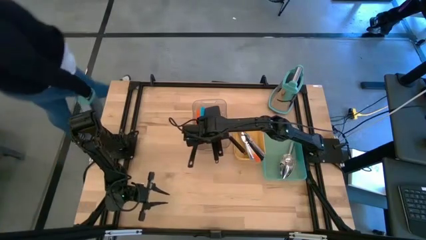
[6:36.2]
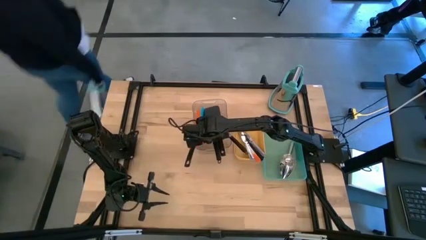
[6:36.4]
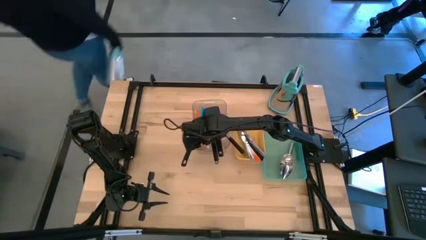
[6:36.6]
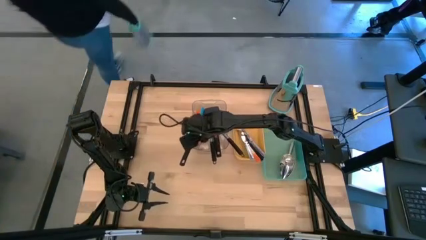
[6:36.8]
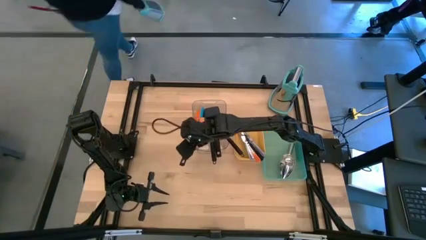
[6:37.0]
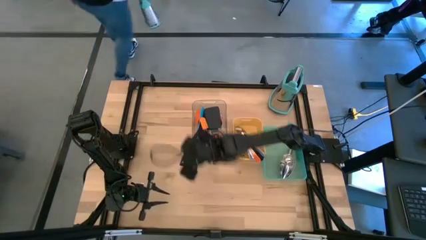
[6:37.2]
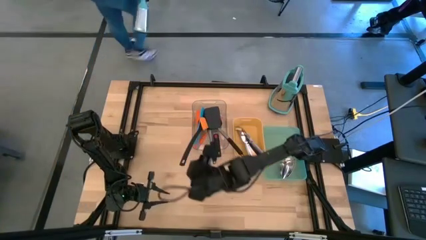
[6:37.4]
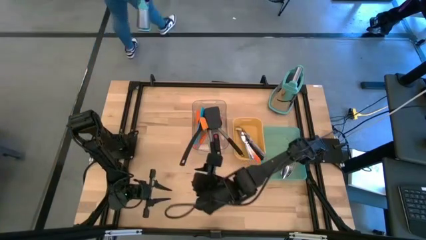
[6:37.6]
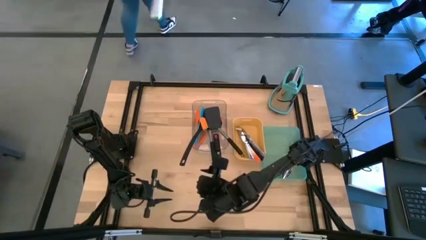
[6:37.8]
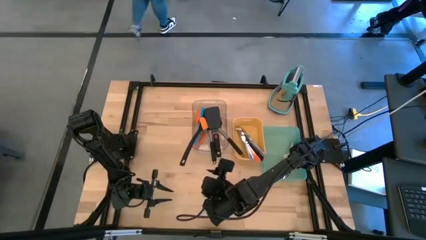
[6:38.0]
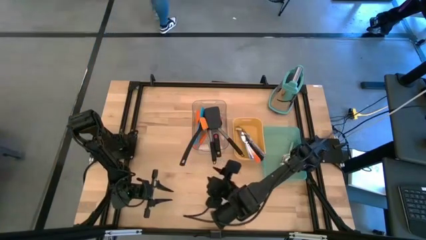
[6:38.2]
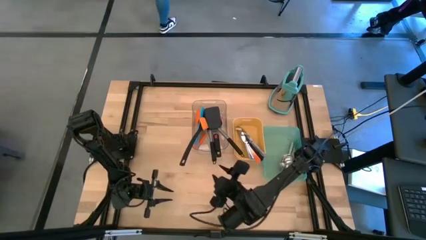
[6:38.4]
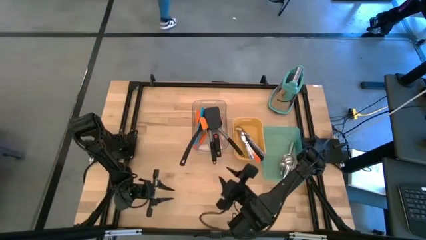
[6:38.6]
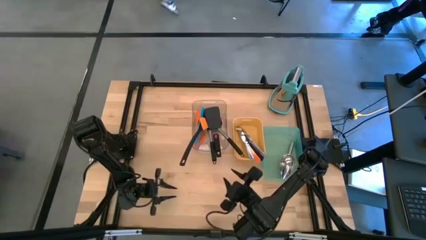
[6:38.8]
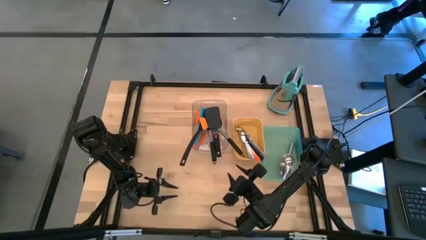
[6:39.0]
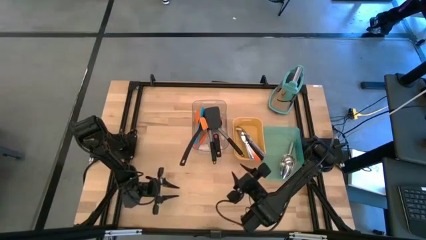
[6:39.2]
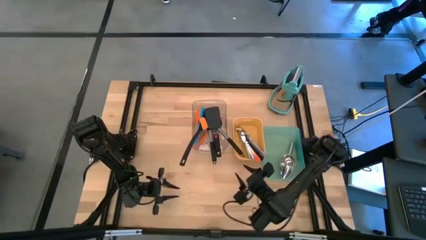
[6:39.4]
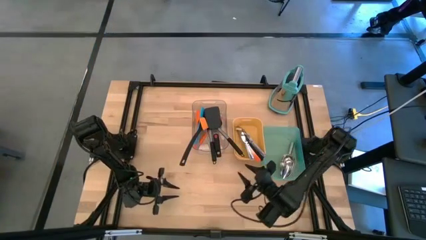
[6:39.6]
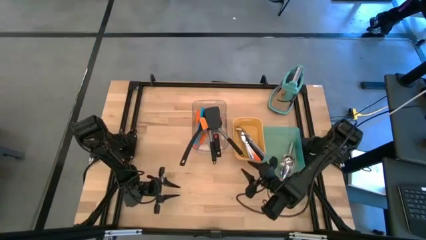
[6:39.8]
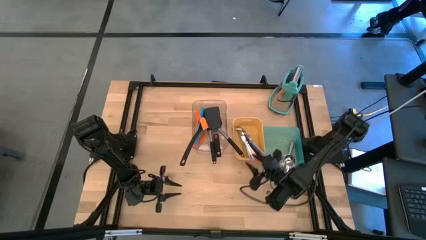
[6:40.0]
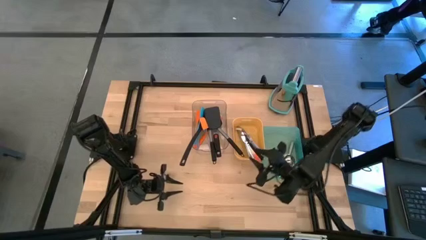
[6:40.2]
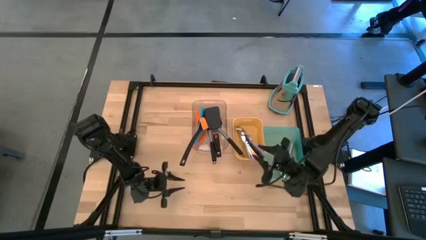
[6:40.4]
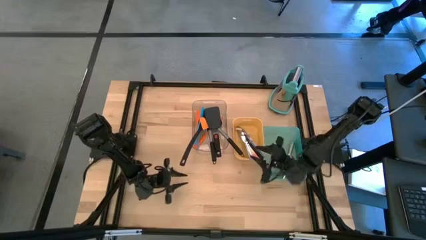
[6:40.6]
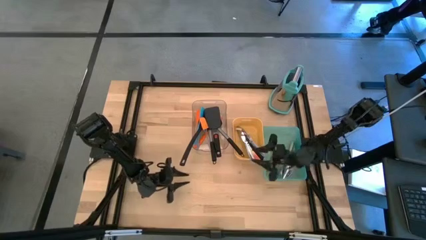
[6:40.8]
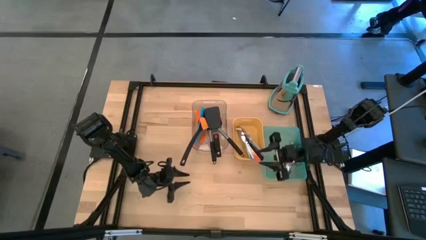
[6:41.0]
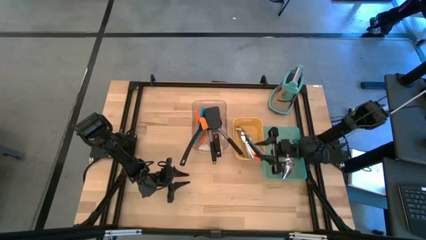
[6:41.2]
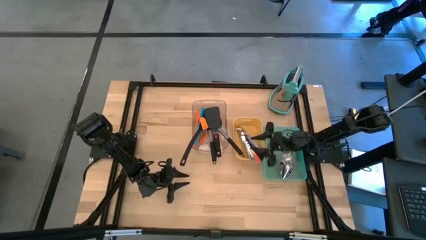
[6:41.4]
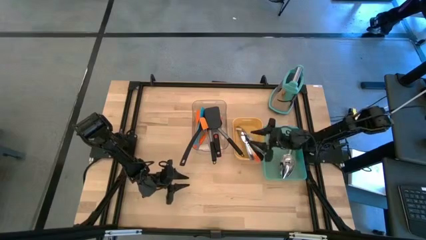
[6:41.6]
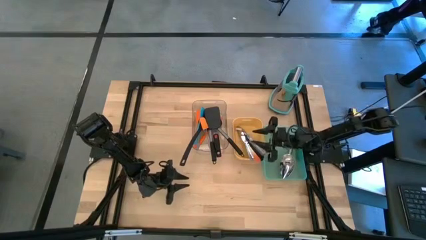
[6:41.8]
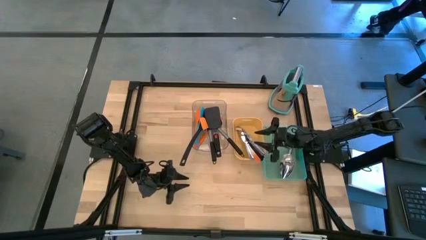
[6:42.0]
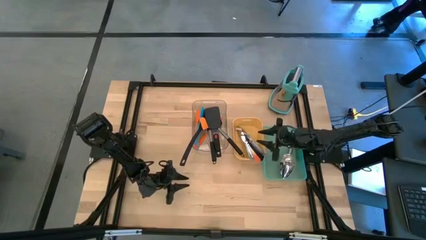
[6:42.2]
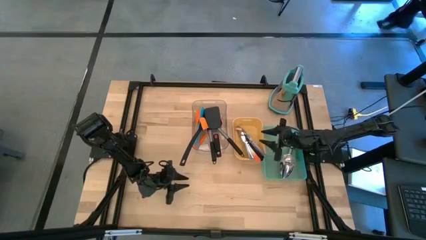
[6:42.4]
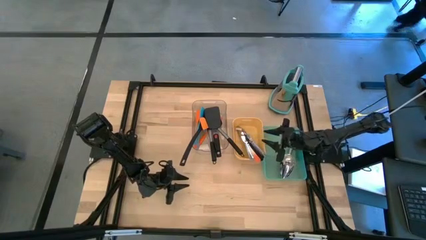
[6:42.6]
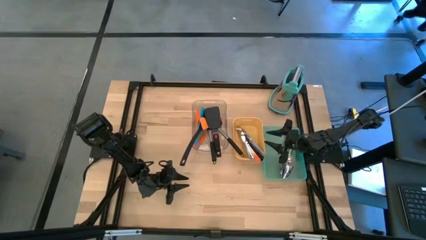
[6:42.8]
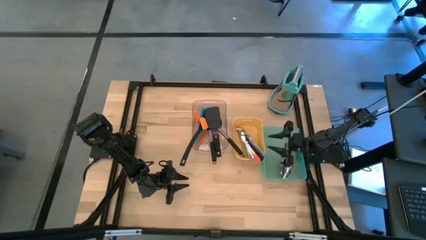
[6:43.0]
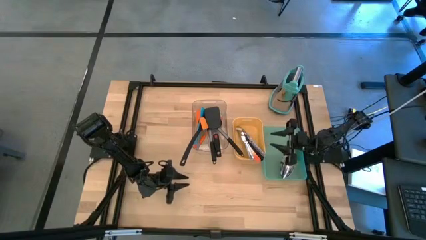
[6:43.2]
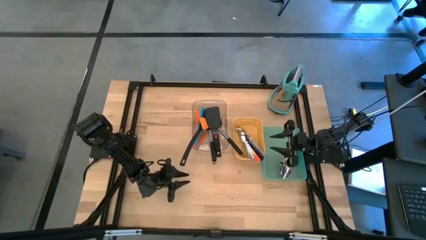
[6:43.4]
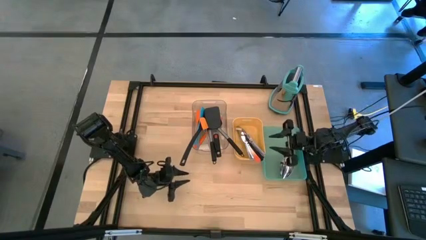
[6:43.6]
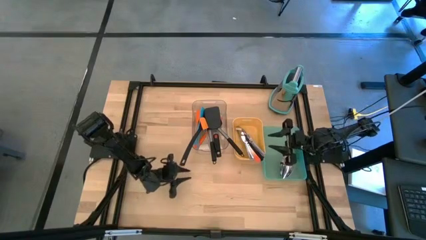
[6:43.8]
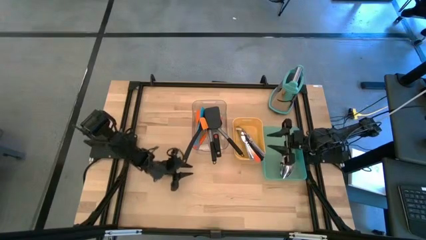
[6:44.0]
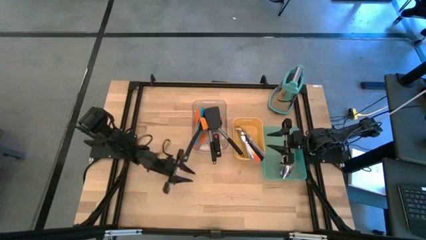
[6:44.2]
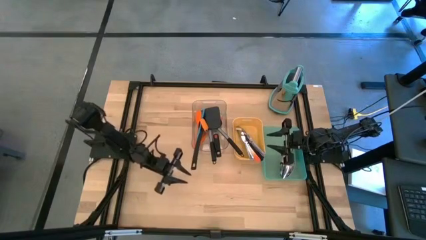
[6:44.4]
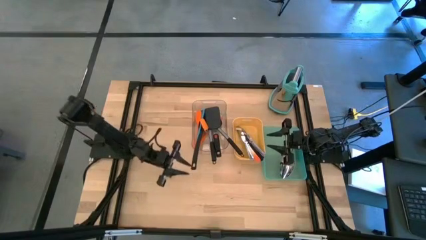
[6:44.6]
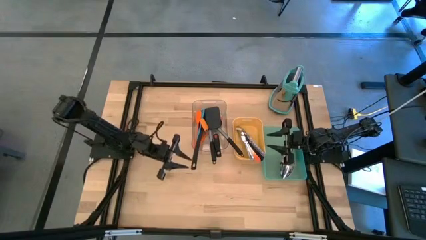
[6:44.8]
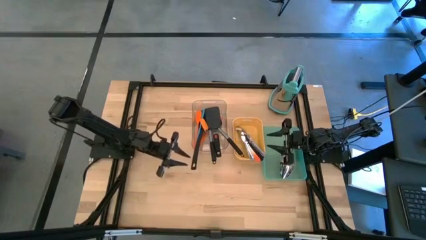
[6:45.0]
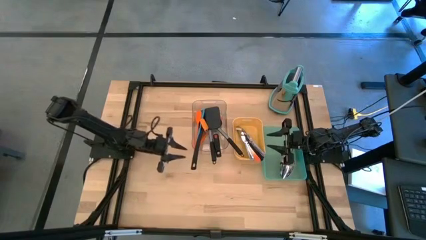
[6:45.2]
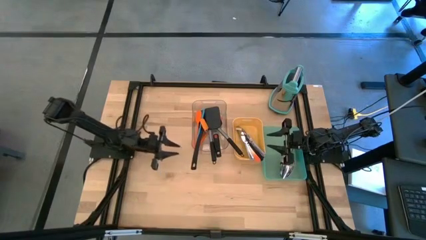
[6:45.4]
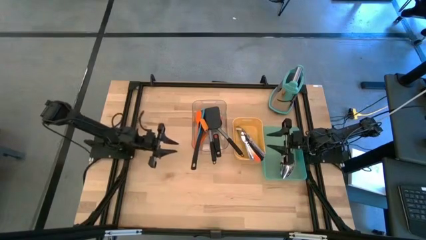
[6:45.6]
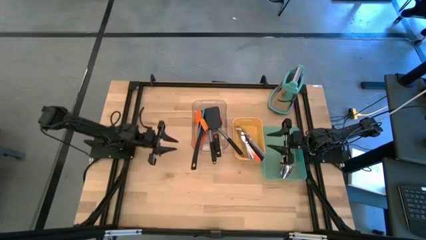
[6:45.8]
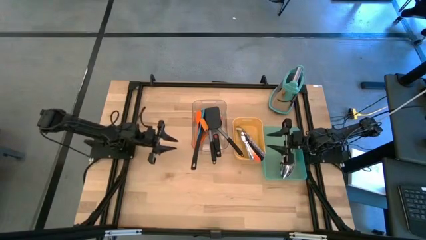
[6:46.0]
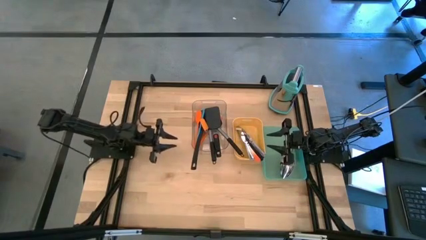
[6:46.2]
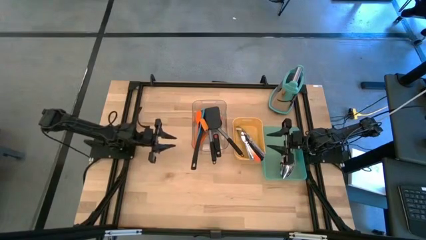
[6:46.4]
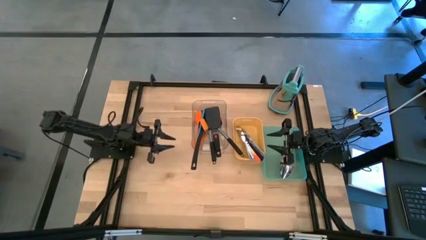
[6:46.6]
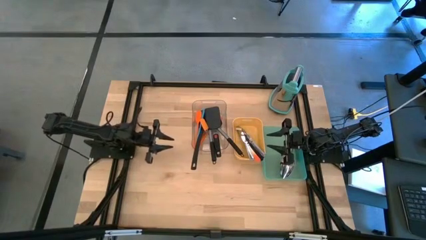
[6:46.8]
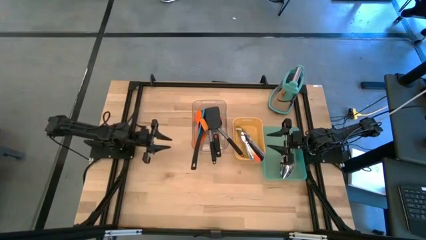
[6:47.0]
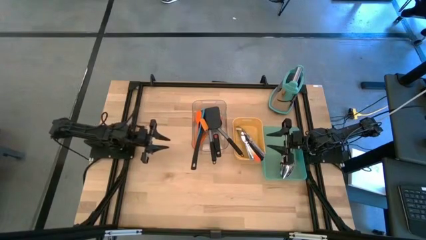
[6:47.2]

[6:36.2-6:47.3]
Task: Pick & Place Kitchen Items
Return to Home Position
